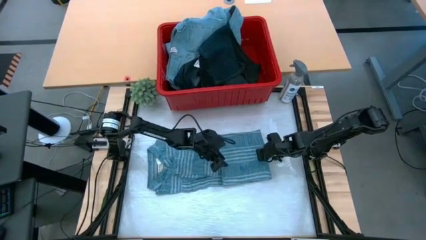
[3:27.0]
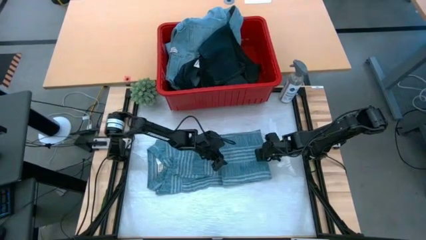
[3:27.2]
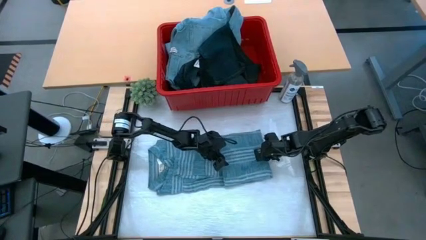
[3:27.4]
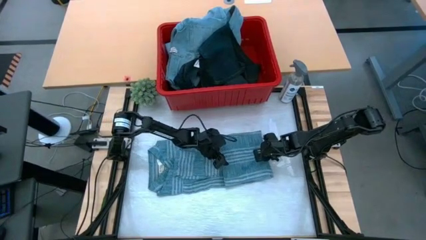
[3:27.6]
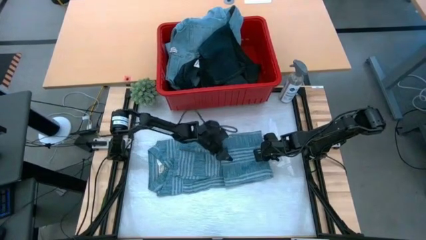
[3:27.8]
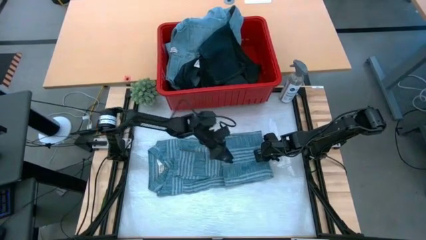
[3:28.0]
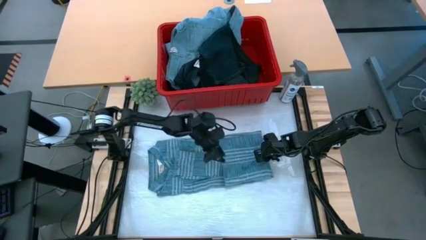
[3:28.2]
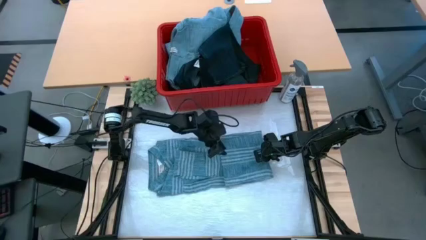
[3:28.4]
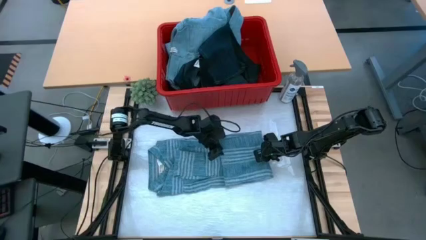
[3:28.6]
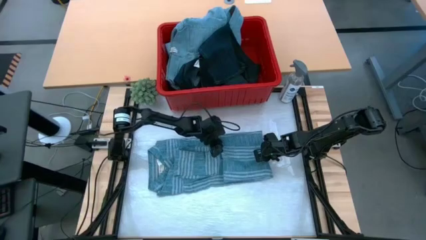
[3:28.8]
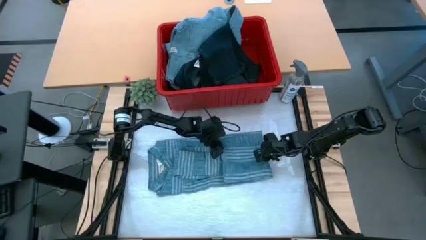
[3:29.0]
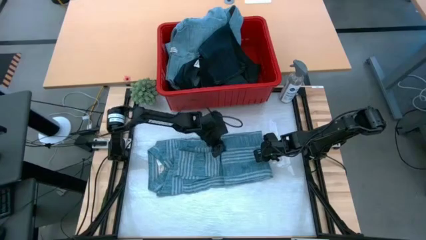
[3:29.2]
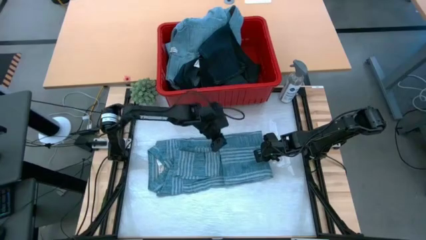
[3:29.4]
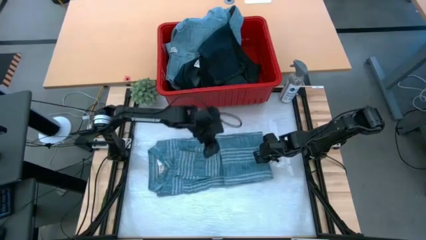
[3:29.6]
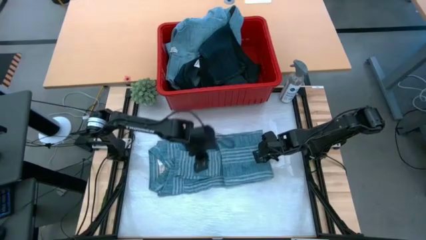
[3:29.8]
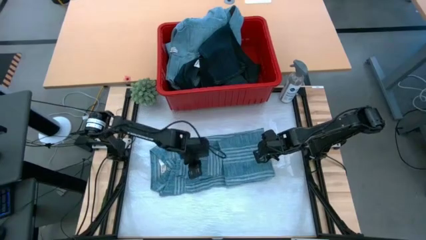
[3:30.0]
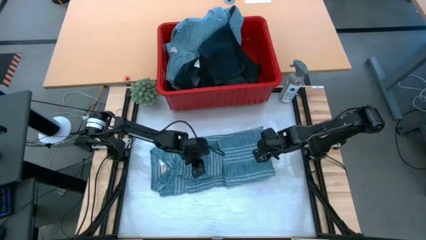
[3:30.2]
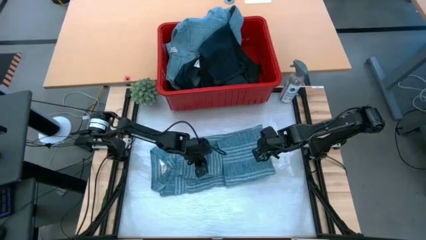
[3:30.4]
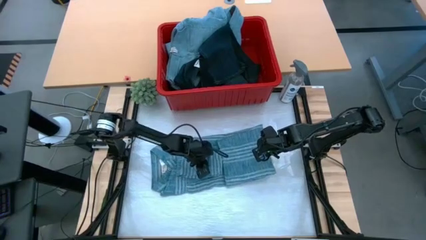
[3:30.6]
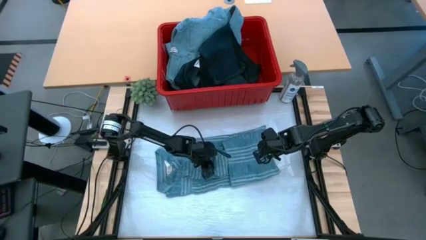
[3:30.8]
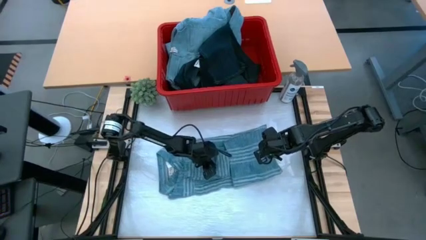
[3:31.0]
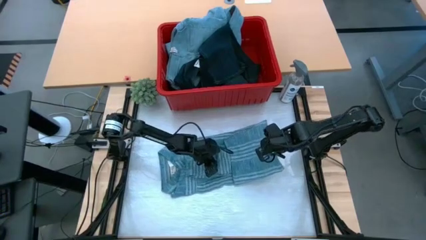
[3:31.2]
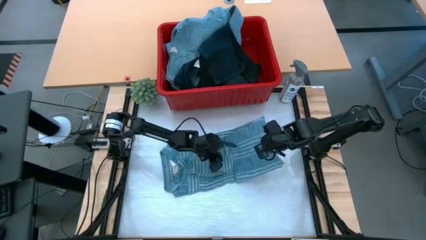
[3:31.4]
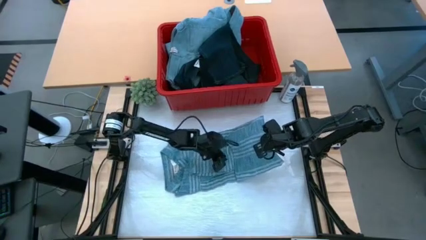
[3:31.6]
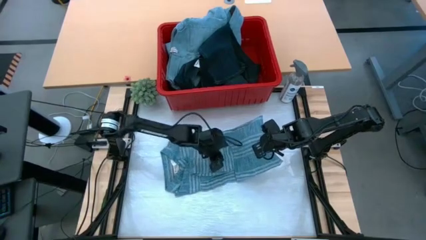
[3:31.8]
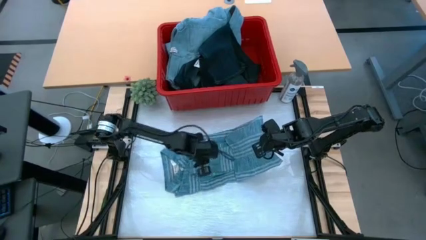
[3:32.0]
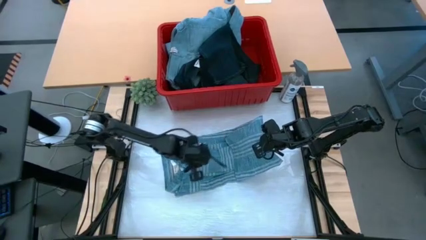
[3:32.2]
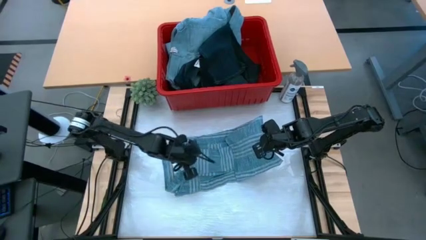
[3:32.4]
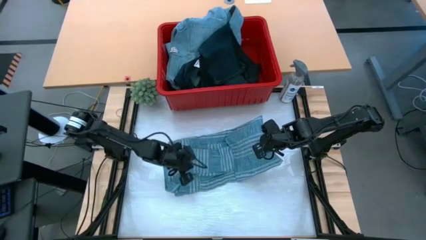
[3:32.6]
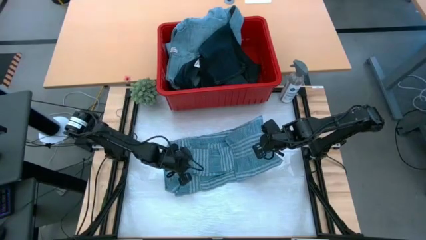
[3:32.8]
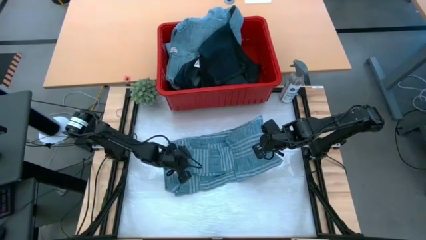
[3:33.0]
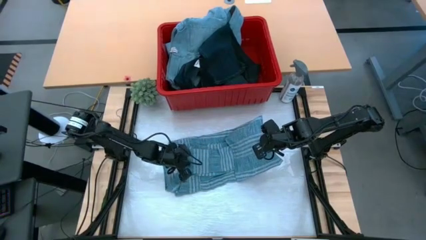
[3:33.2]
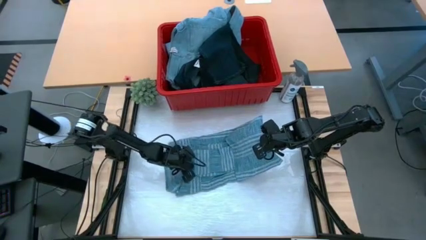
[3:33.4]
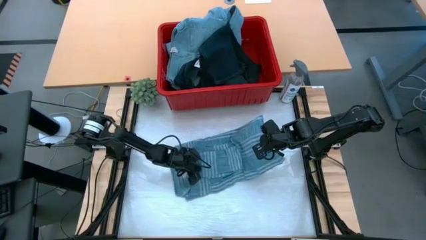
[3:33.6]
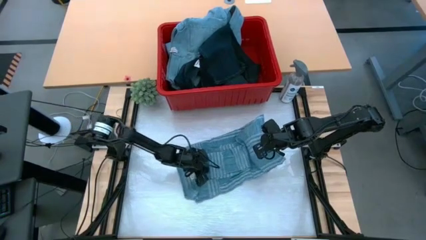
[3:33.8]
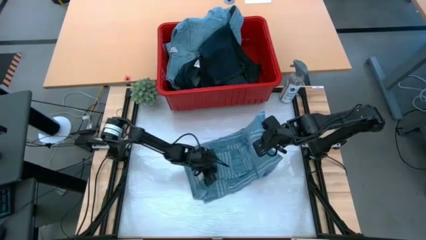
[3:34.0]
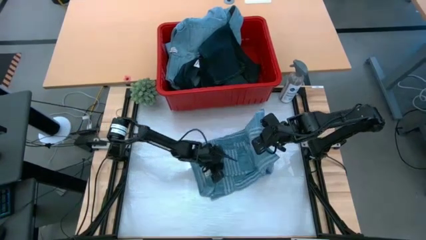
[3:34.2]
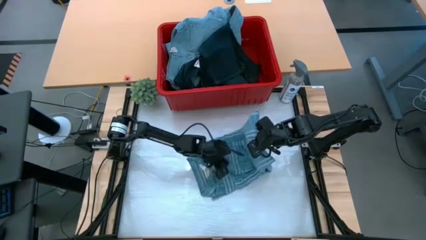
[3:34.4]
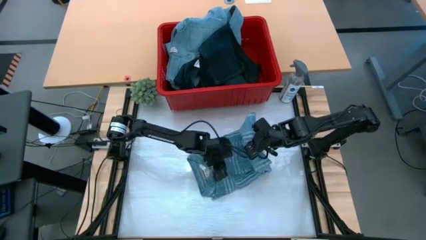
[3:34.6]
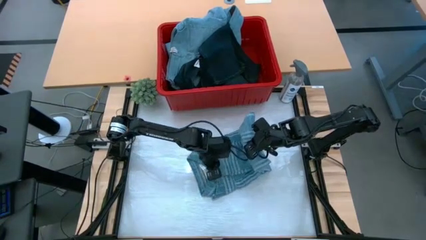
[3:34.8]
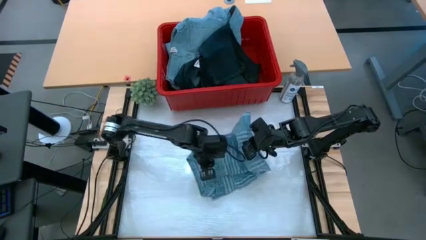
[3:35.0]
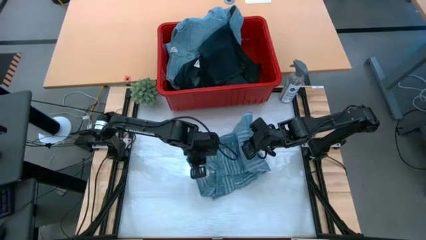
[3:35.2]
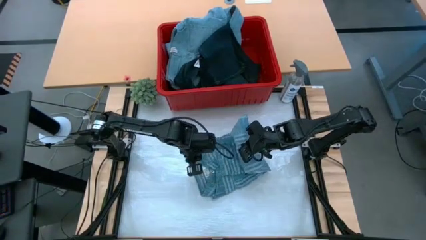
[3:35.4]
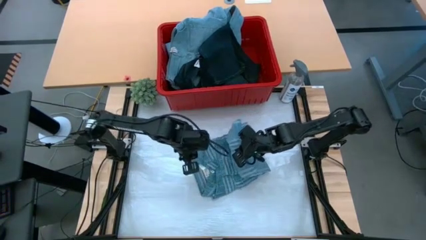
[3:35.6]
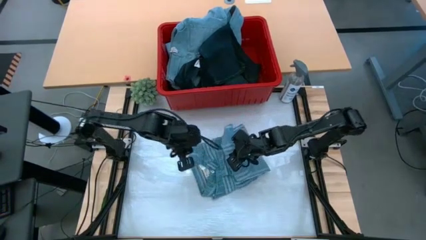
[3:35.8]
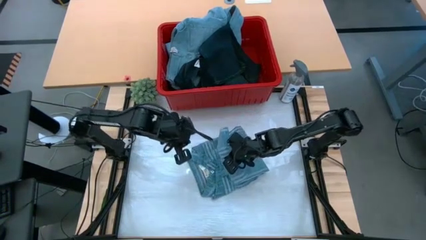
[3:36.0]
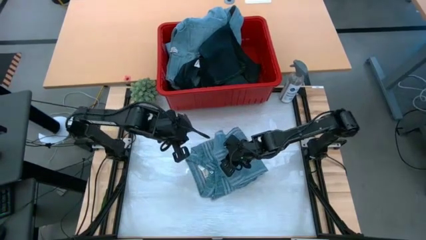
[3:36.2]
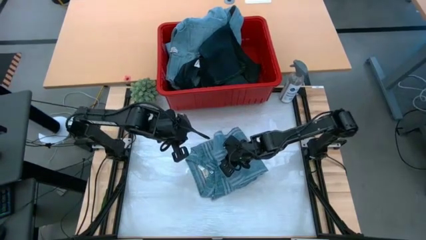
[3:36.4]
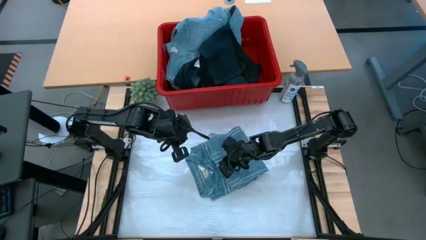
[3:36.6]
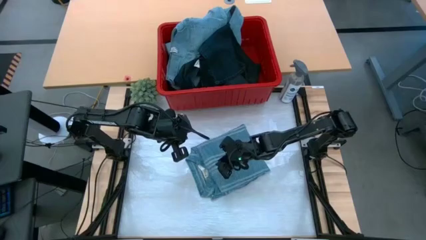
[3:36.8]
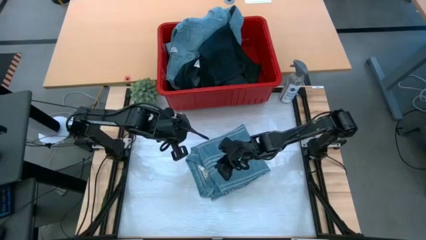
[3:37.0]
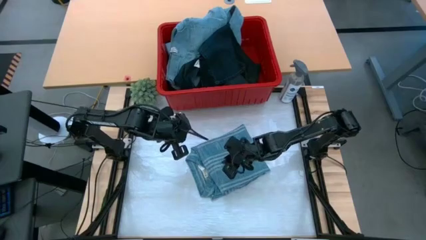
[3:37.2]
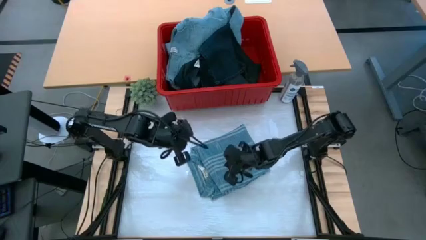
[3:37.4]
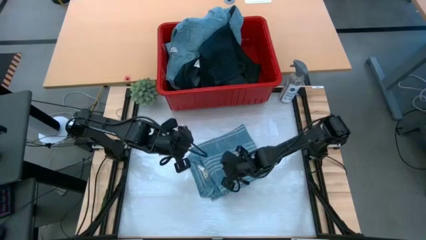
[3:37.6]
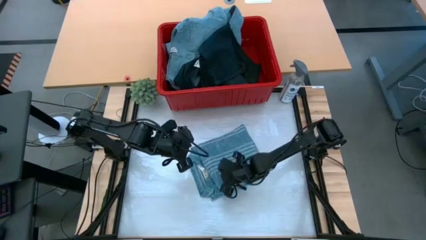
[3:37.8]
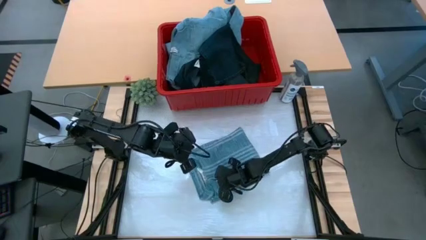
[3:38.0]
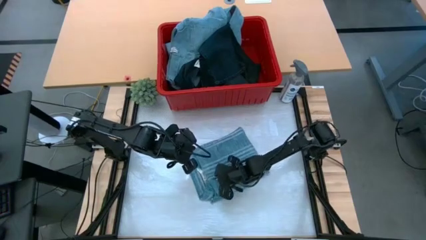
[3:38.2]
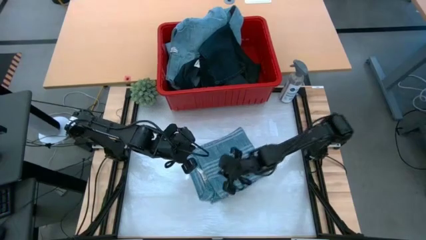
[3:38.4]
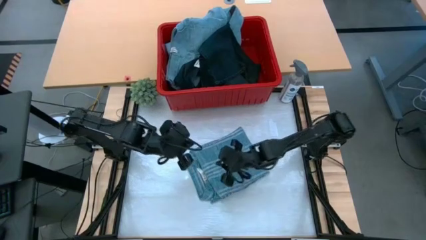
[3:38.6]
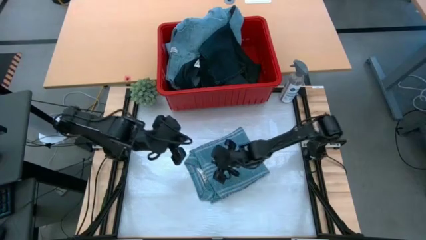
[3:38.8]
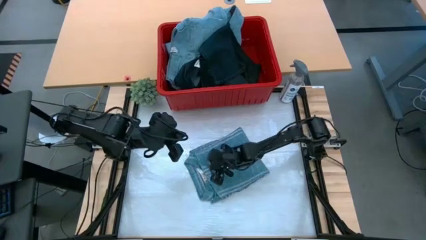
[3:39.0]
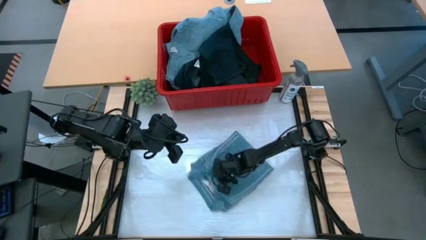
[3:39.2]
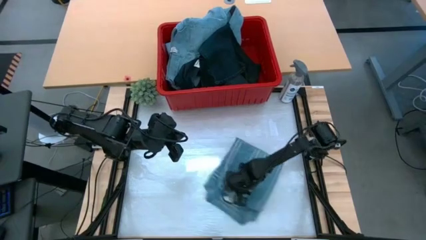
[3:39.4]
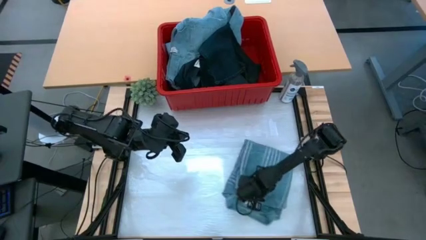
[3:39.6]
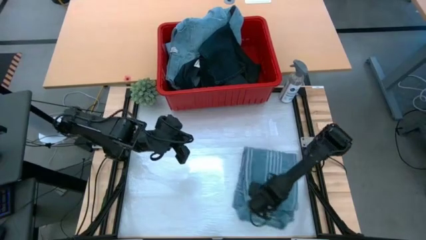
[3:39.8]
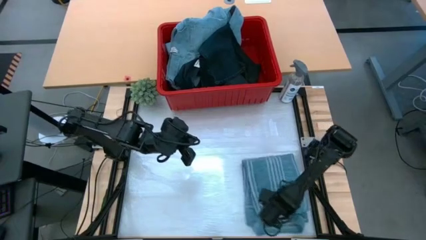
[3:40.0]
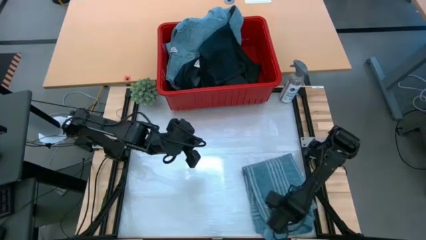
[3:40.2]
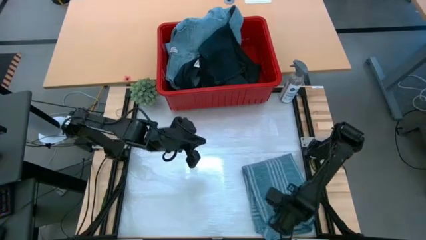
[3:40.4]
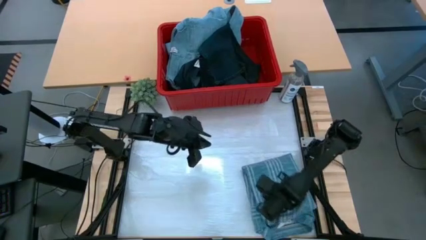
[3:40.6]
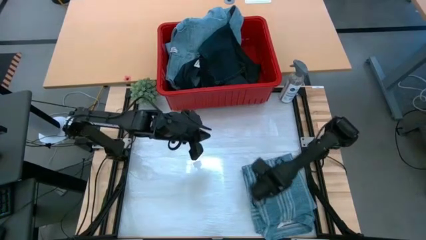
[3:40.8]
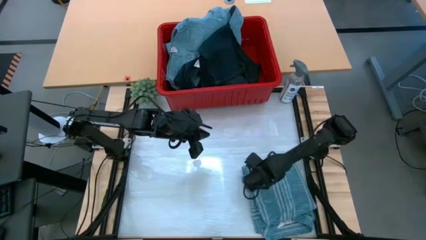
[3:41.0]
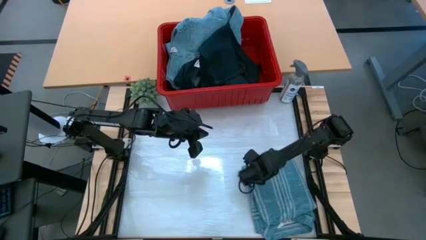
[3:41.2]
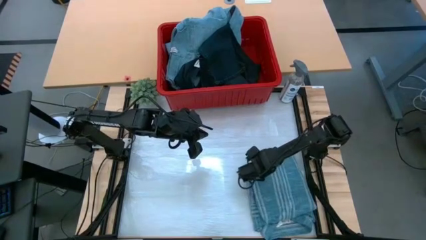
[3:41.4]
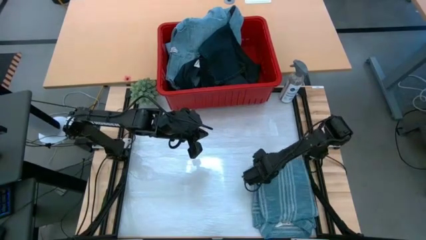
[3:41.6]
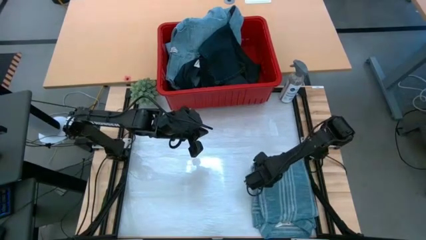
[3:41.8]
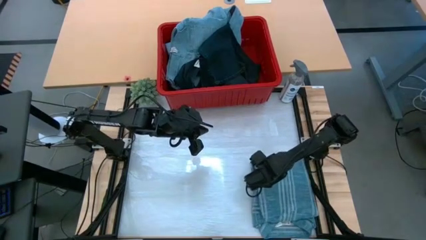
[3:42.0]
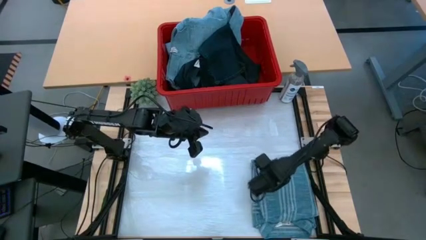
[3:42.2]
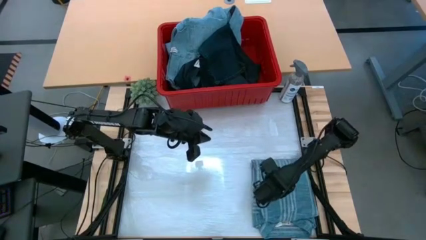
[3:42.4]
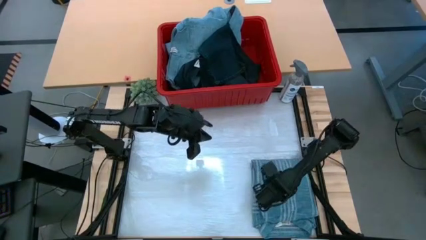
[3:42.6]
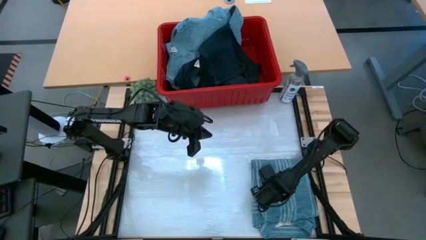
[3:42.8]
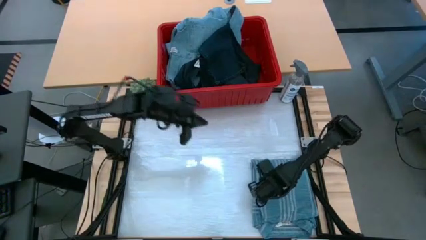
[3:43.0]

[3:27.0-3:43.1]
Task: Fold Laundry from Bin
Fold the blue polo shirt
